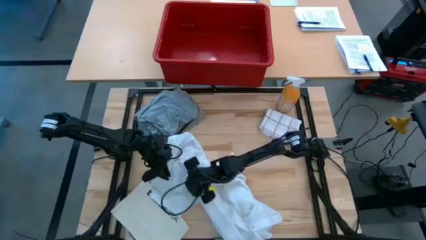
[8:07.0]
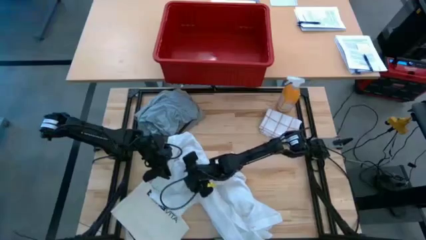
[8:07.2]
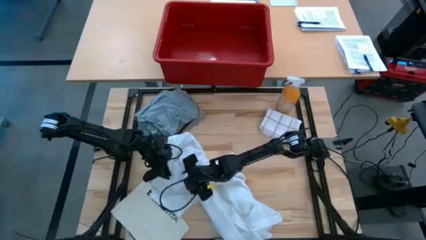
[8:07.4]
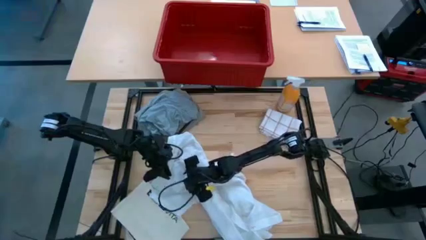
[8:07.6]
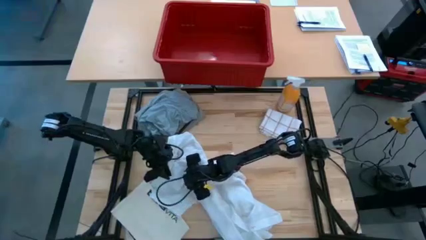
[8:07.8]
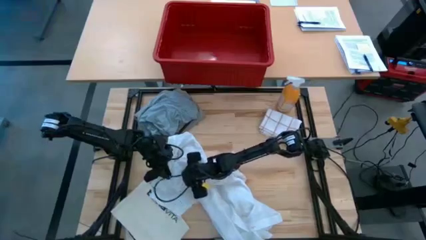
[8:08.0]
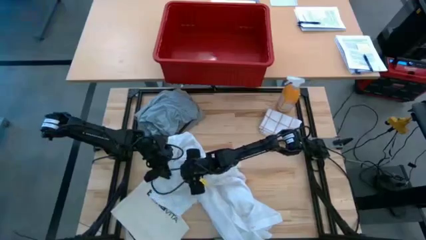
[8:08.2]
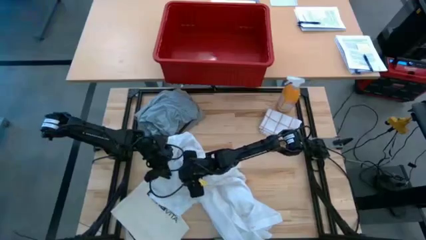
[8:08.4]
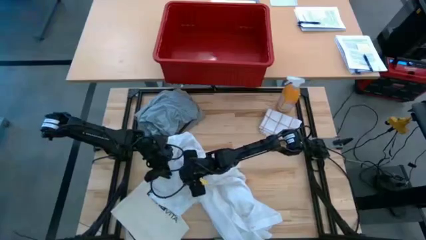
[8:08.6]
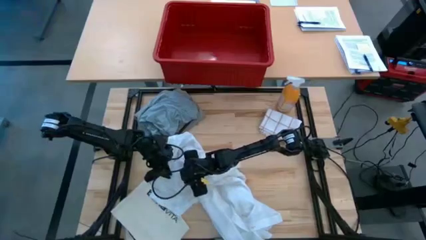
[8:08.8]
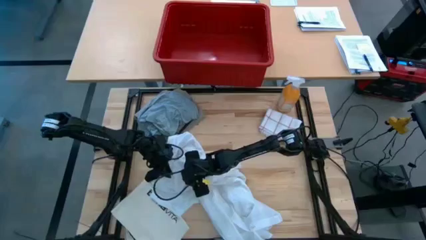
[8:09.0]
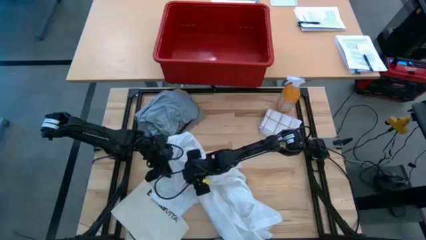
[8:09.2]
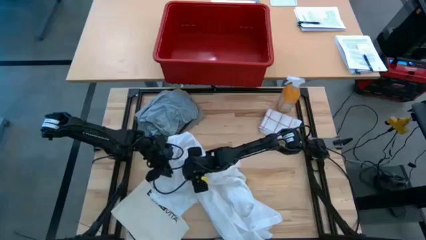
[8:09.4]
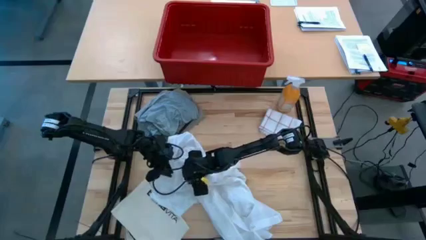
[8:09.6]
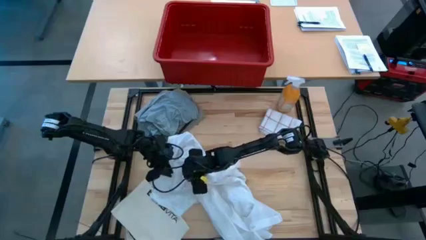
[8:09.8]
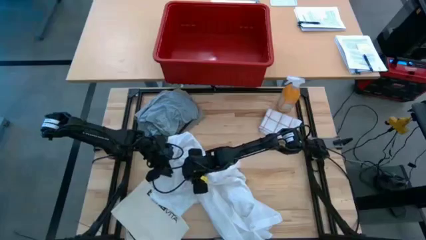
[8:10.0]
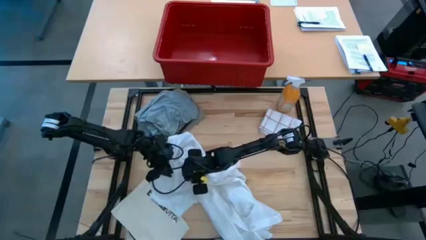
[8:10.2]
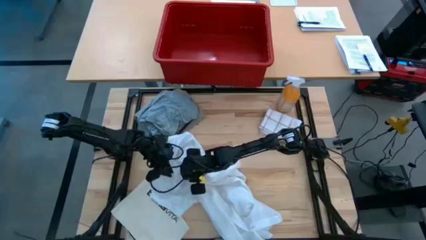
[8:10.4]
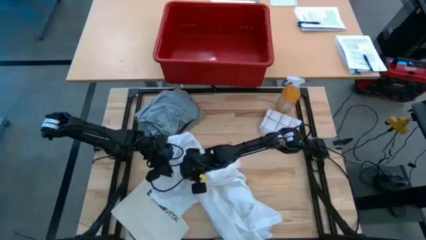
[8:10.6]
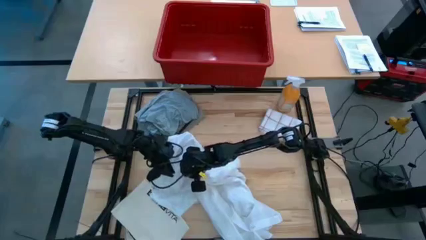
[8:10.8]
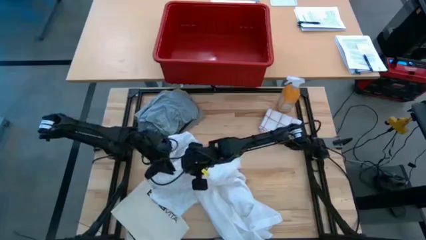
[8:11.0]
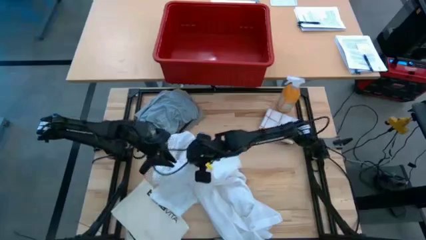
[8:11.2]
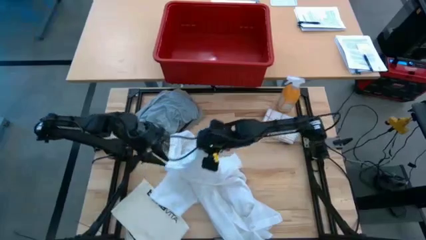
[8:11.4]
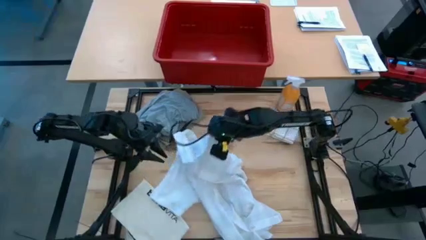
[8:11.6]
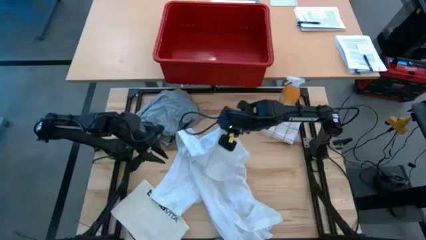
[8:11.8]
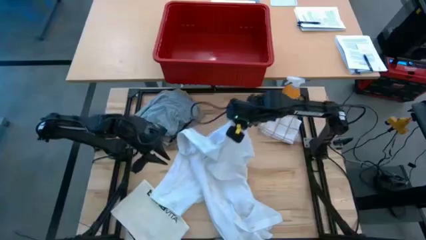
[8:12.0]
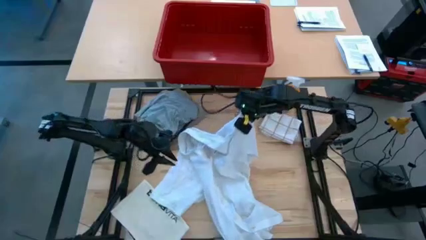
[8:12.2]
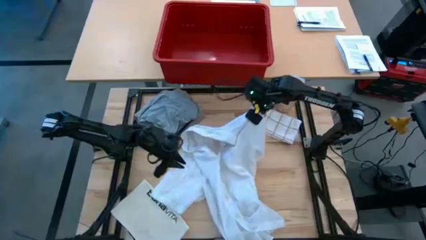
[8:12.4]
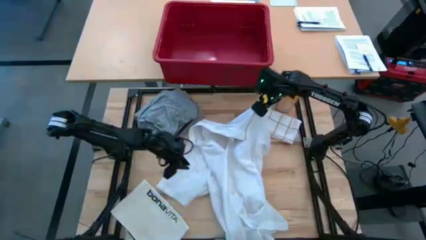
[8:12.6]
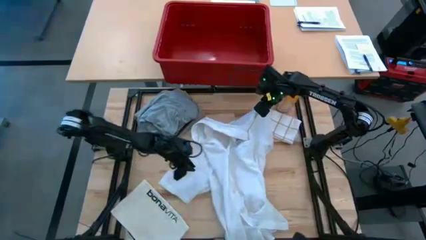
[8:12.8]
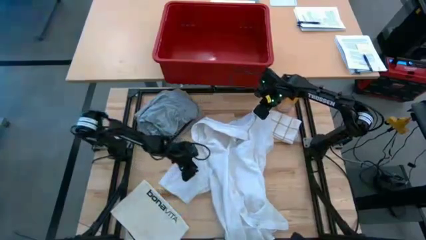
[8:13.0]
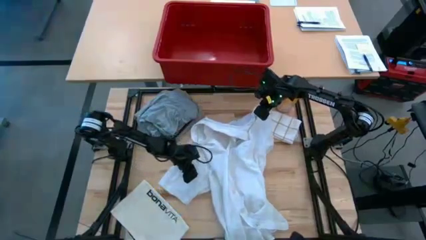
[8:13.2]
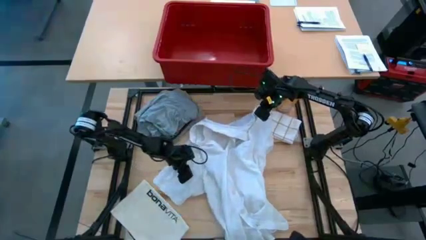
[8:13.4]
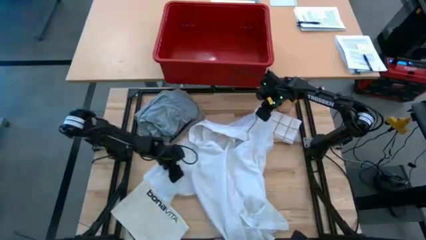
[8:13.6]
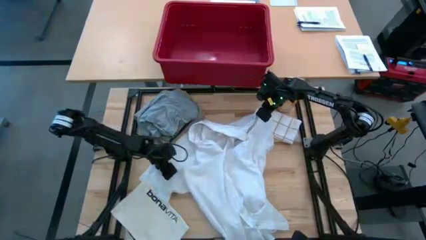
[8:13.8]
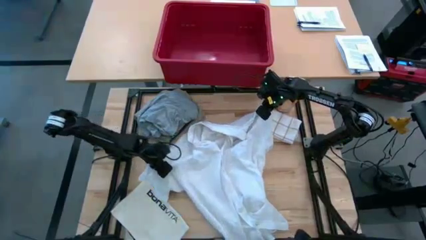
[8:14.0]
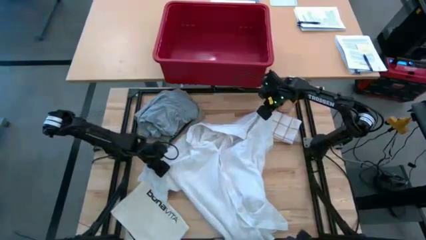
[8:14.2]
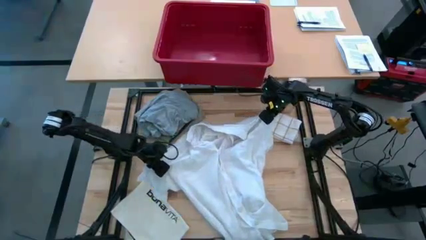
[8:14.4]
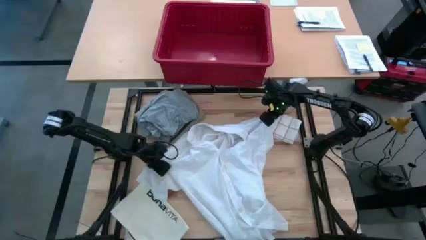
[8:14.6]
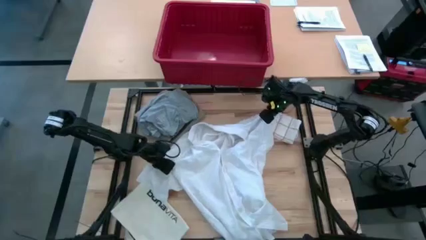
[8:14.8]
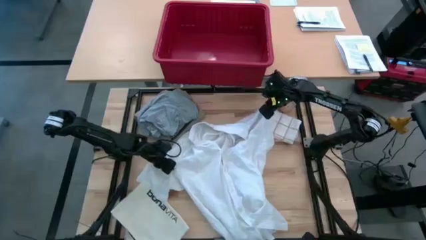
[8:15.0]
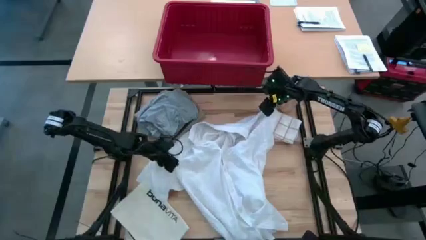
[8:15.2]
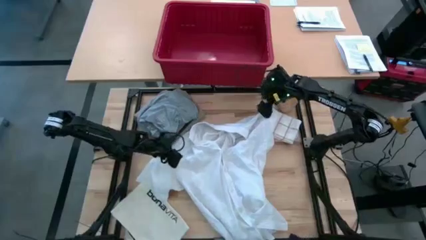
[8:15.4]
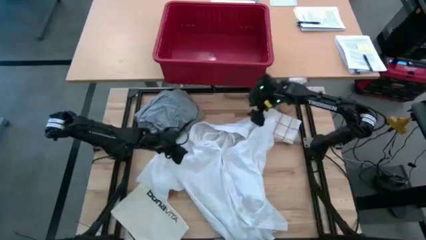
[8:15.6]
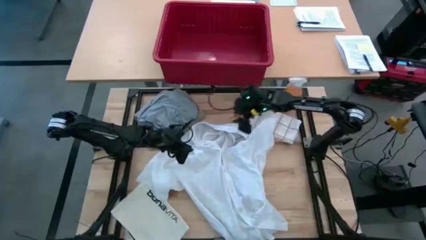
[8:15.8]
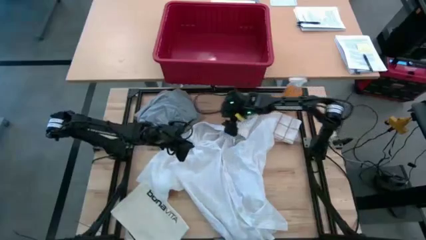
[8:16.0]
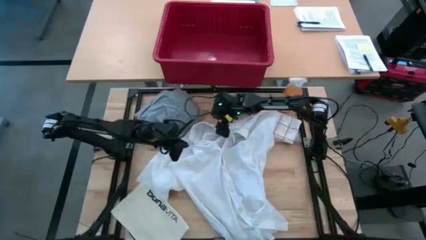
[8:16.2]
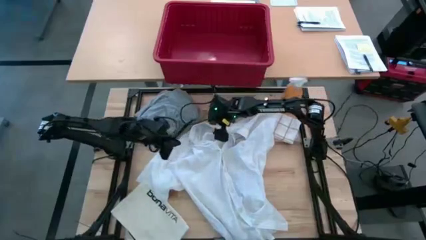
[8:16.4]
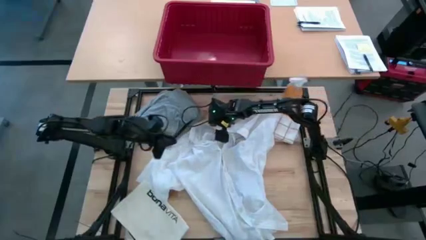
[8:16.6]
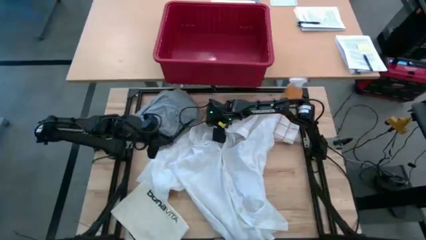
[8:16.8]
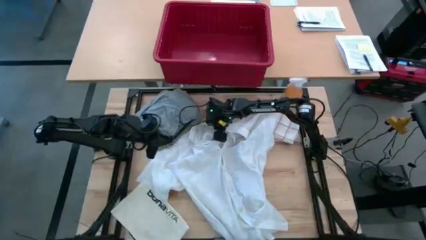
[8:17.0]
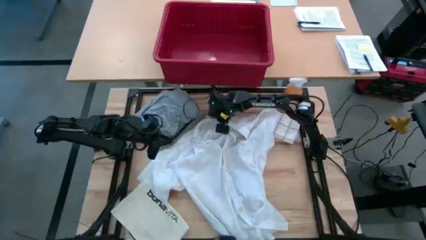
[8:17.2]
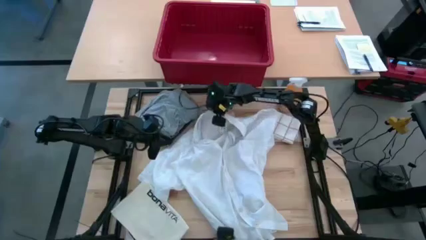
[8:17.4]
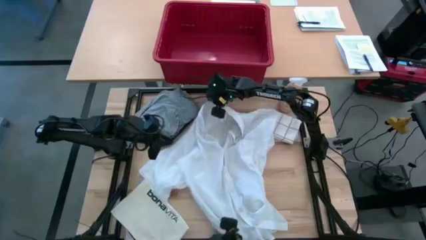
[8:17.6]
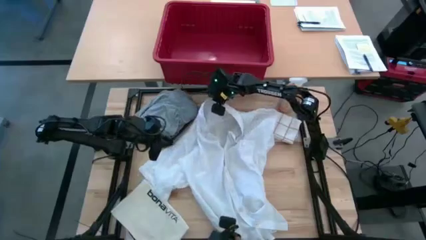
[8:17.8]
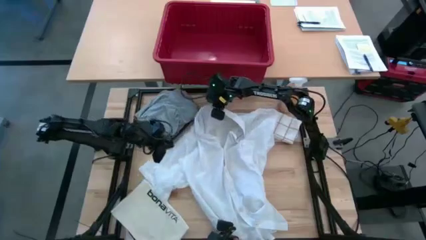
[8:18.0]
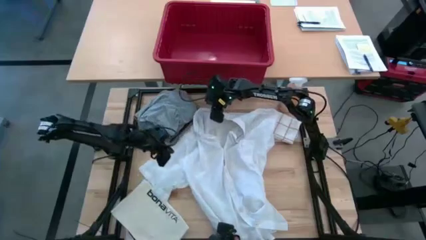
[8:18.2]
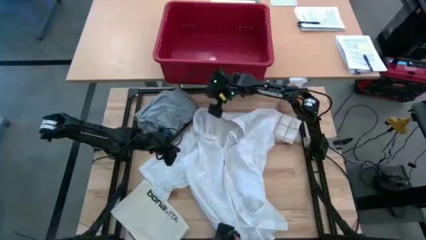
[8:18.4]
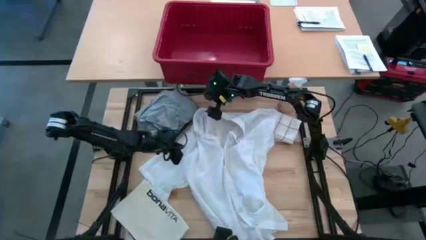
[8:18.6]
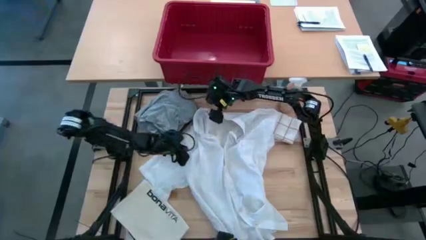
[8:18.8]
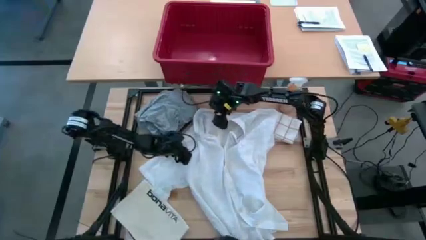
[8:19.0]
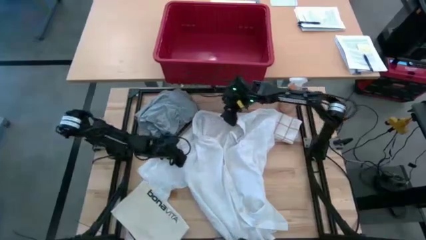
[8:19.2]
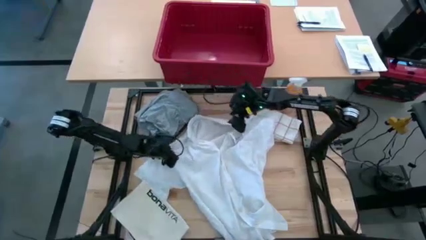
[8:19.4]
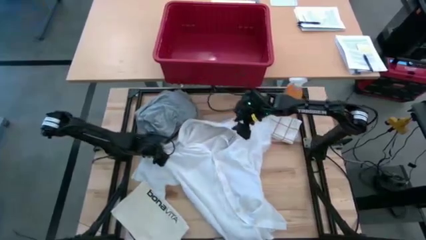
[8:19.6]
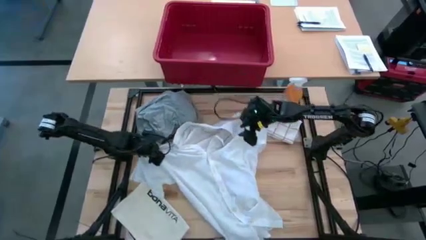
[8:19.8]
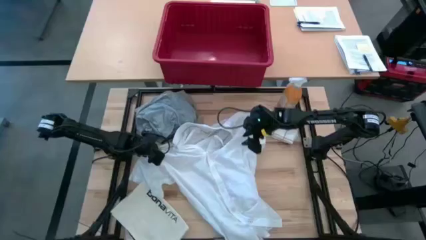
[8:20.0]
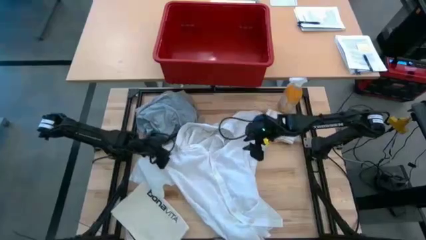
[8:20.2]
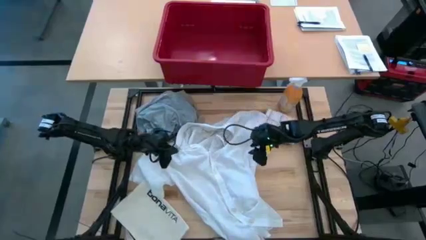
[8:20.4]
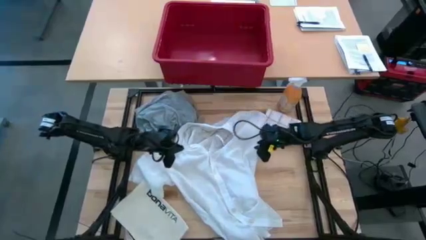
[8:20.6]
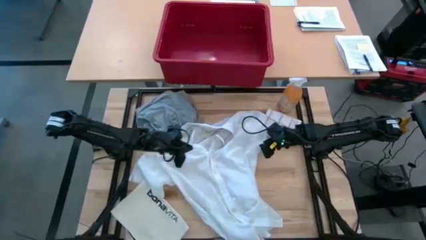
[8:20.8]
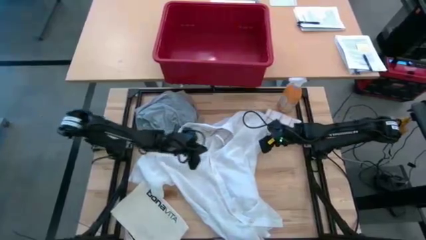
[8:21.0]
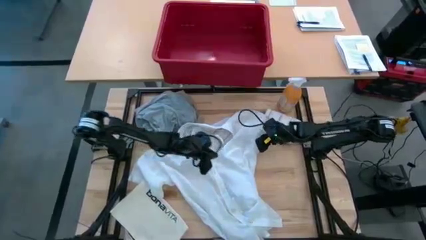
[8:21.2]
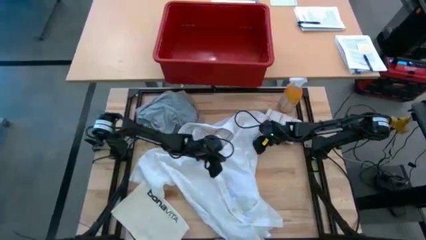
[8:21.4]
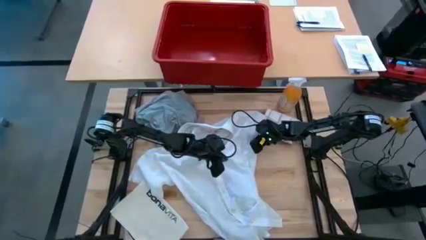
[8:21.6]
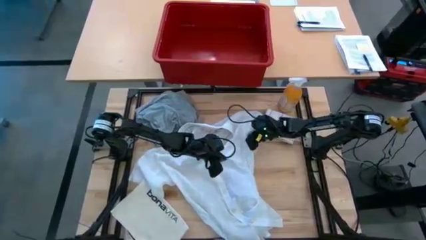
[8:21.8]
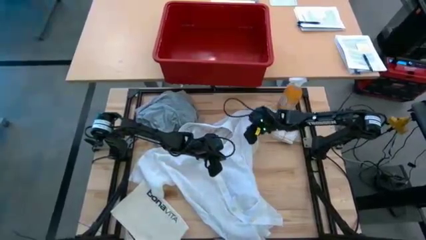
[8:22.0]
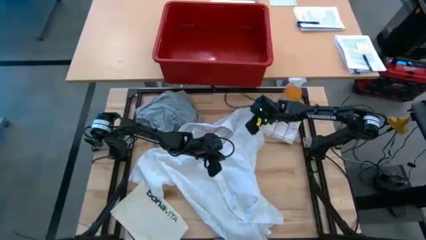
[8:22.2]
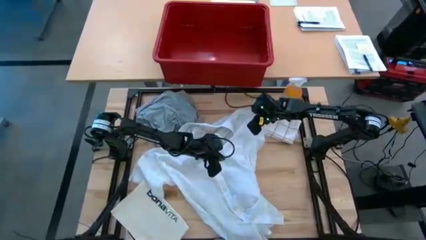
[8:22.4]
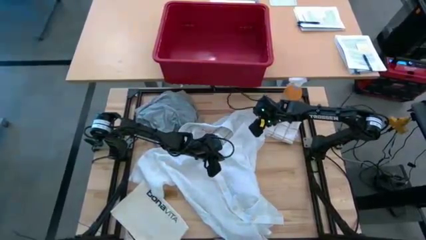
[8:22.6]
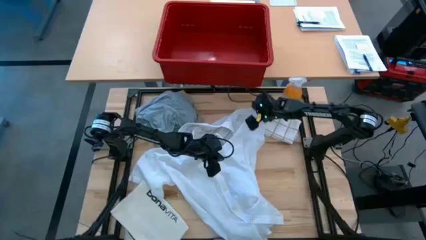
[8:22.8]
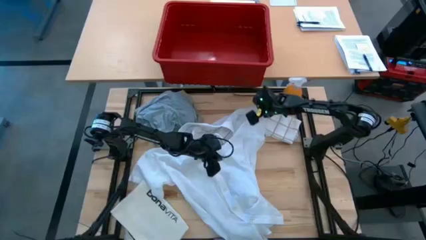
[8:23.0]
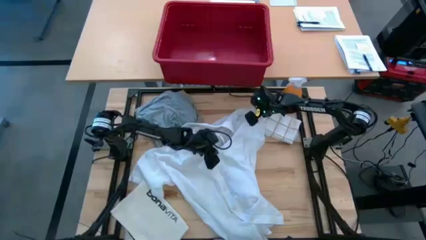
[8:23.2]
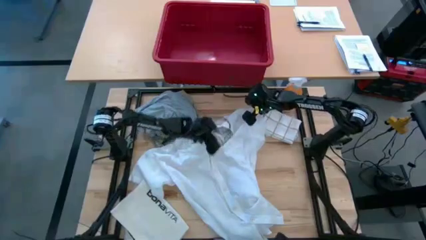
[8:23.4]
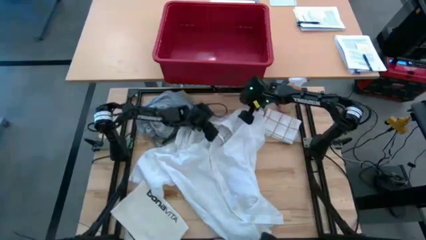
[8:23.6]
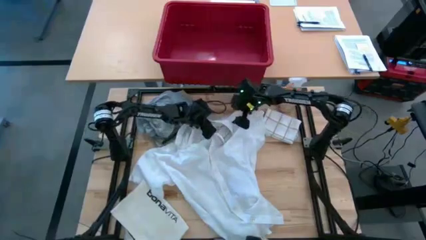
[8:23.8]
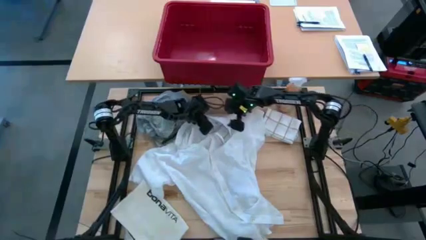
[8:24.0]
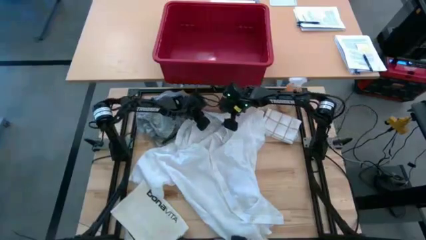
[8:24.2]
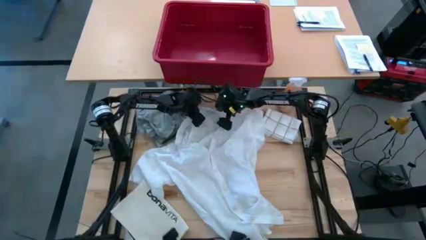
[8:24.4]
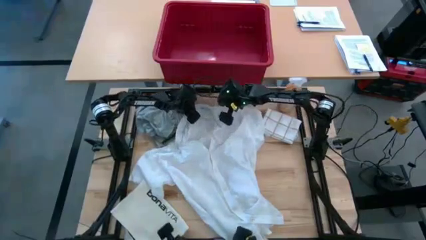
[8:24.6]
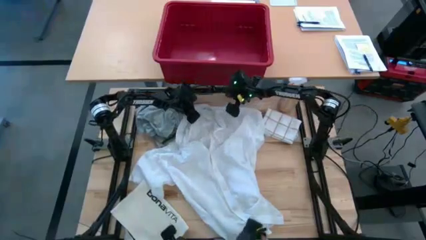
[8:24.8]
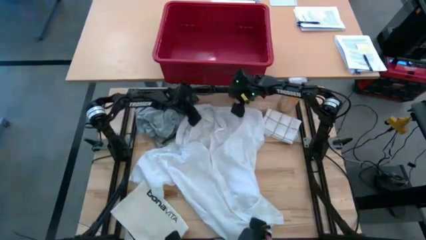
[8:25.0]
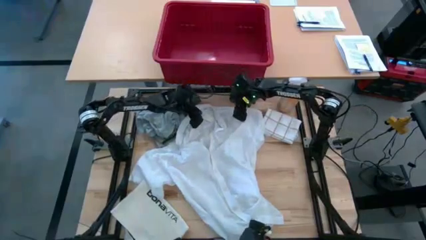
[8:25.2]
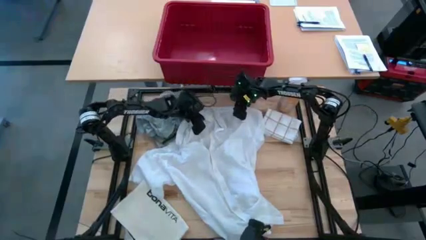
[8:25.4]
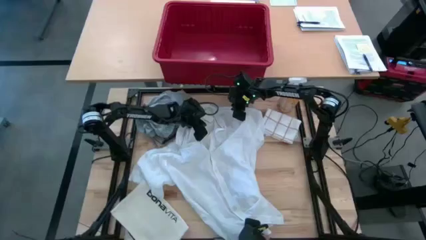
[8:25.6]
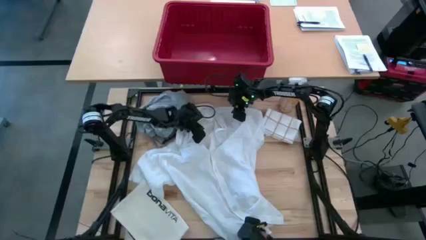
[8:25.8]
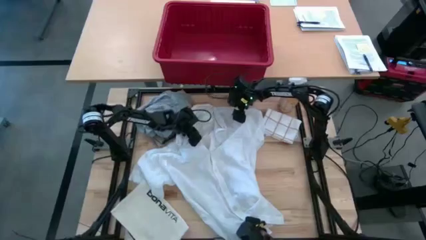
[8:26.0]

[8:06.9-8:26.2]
Task: Fold laundry
Fold the white long sleeve shirt
